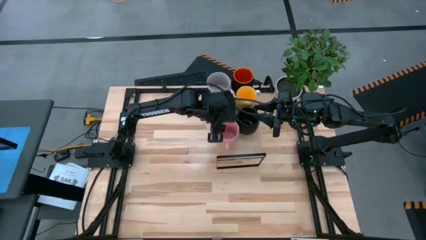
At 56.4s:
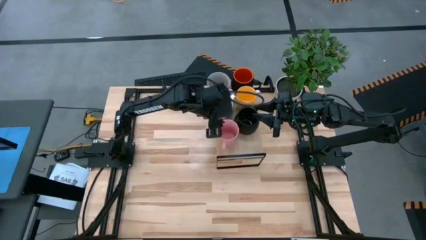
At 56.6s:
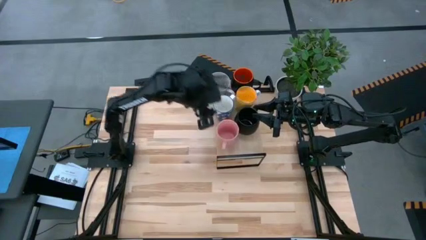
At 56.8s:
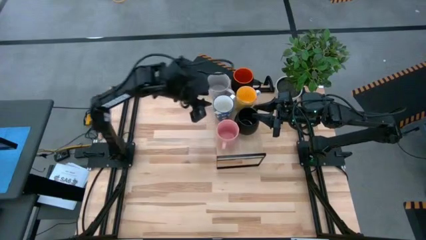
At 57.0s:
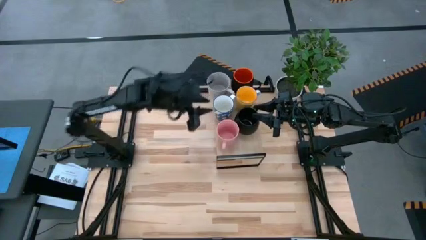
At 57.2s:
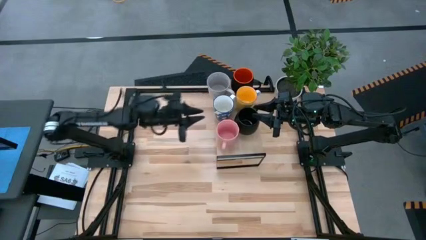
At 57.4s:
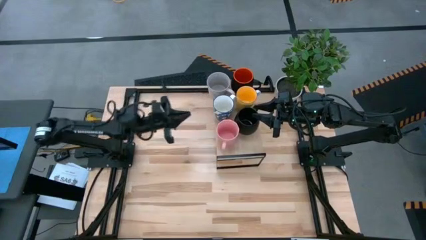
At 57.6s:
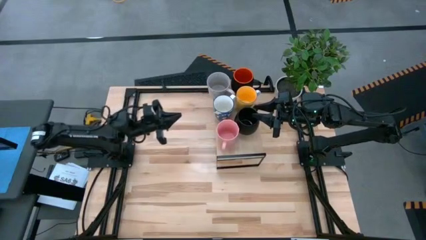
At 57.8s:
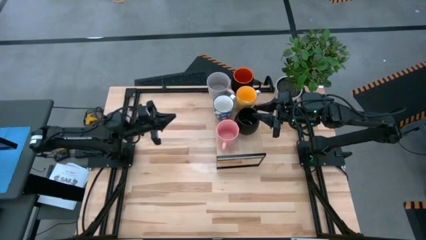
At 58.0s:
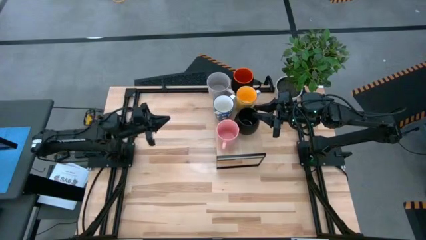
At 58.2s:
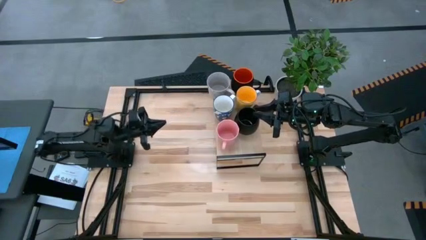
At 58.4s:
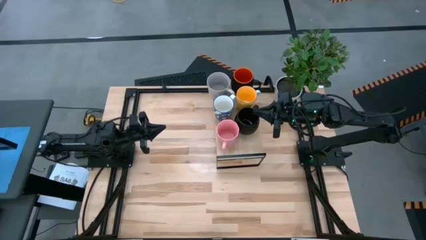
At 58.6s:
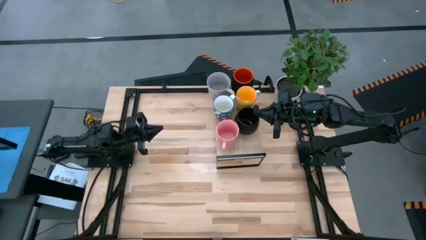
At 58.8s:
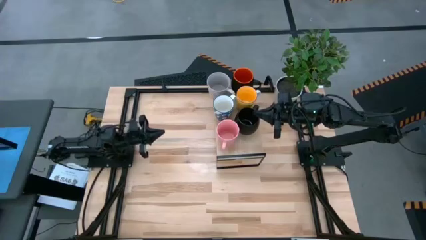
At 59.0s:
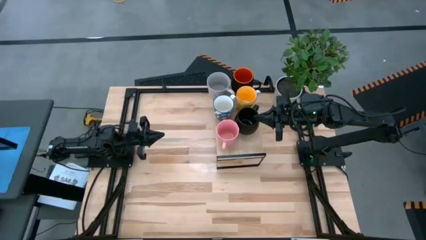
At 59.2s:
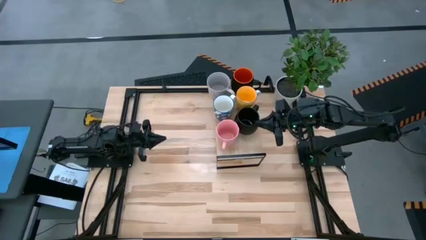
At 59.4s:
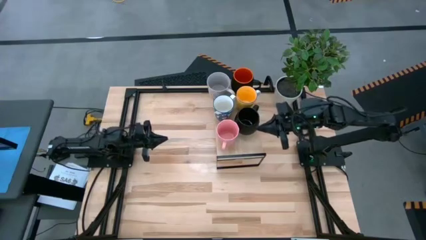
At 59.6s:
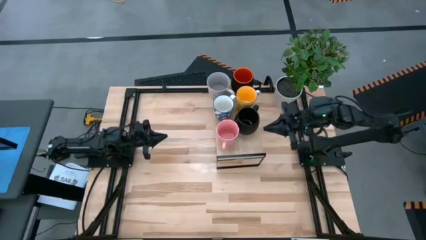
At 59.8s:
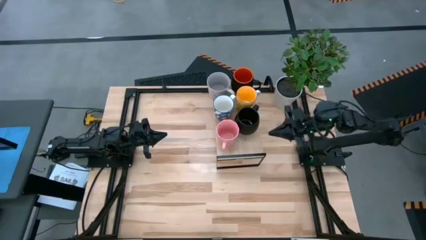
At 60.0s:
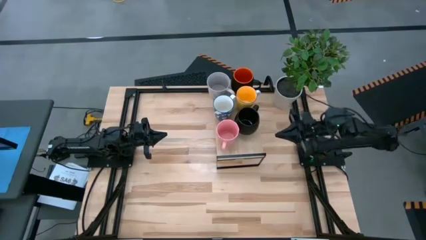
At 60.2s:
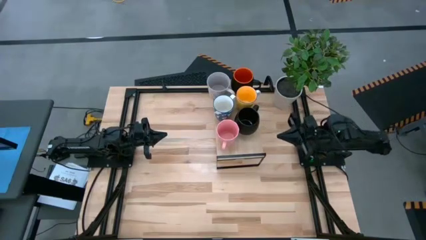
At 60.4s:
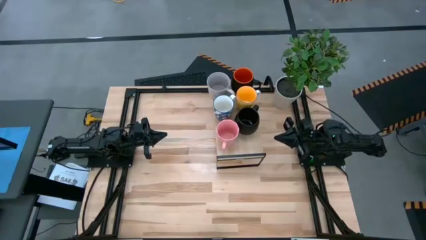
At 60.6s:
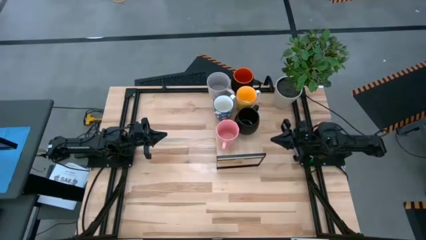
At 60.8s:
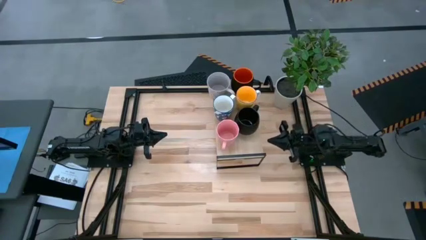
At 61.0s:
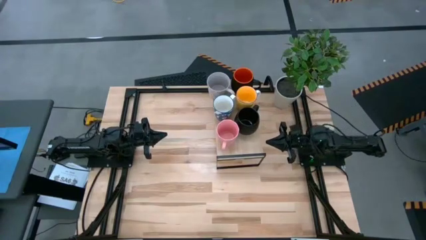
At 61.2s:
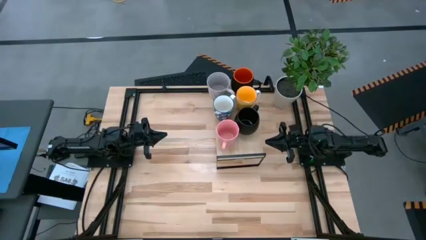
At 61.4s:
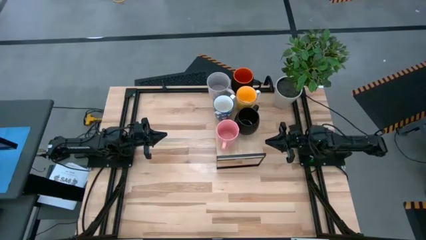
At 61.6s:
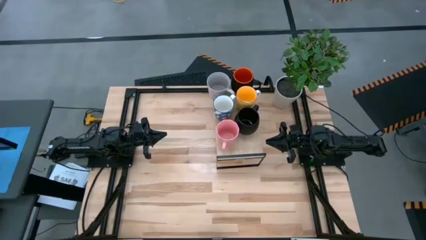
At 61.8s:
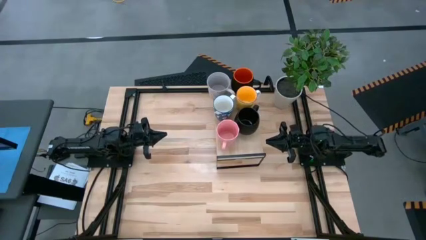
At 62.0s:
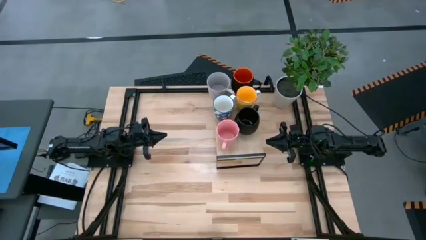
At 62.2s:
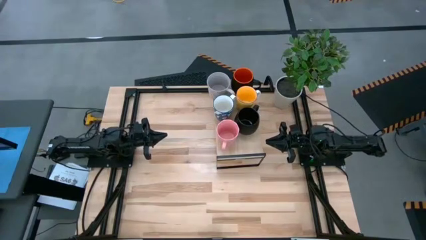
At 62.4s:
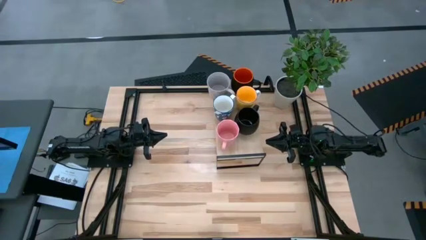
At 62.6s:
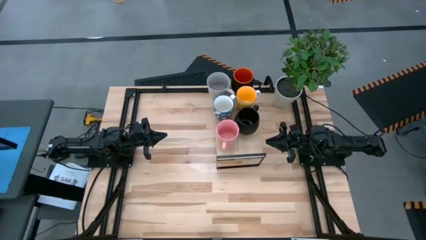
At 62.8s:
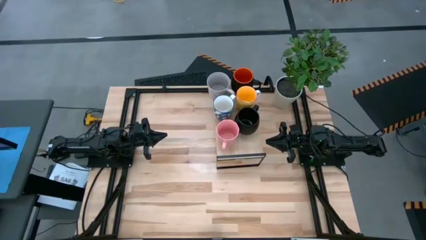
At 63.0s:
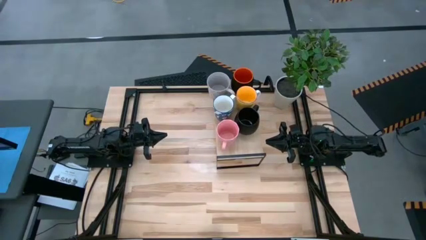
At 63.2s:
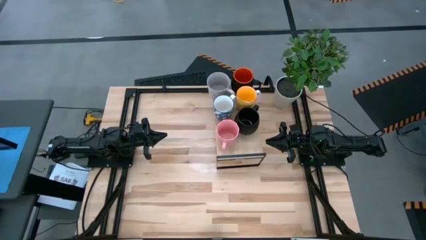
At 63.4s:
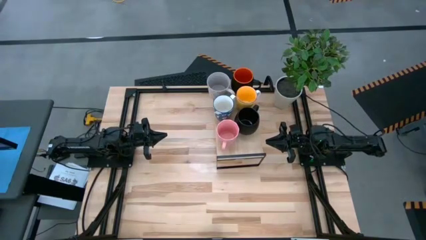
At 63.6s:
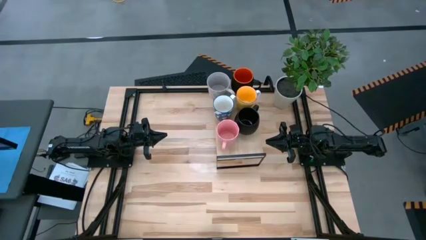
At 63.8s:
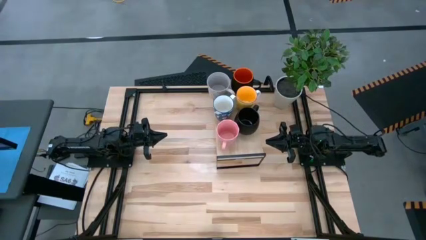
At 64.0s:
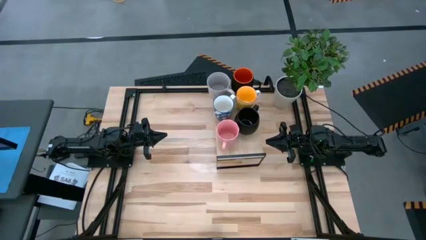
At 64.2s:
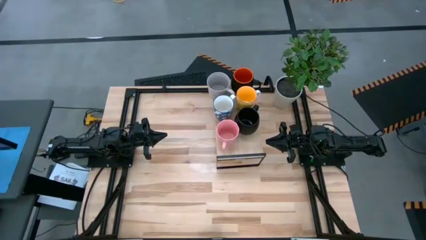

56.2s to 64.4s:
Task: Place coffee mugs
Return to Home Position

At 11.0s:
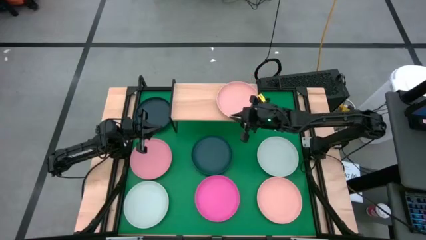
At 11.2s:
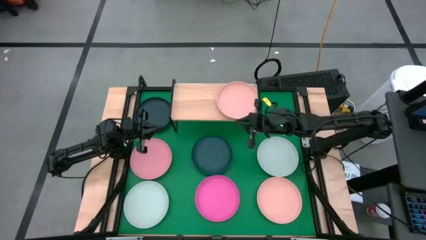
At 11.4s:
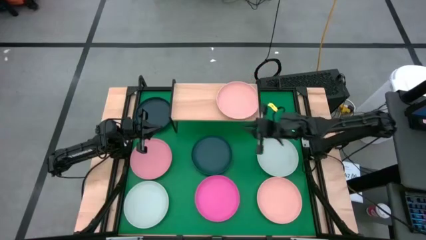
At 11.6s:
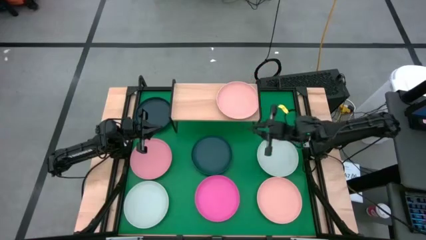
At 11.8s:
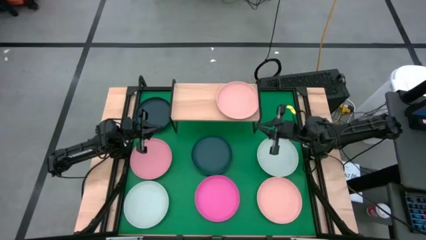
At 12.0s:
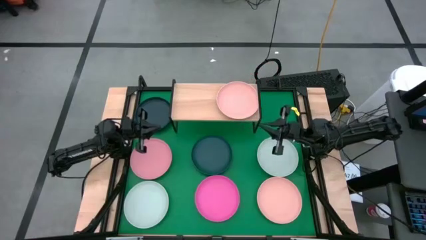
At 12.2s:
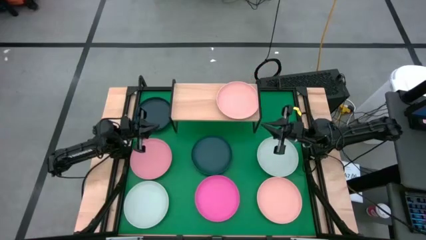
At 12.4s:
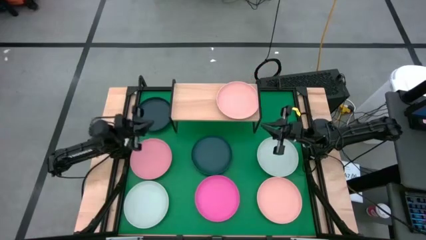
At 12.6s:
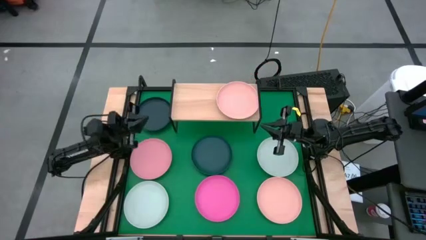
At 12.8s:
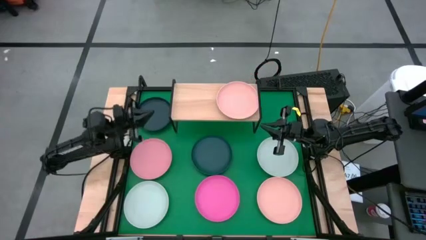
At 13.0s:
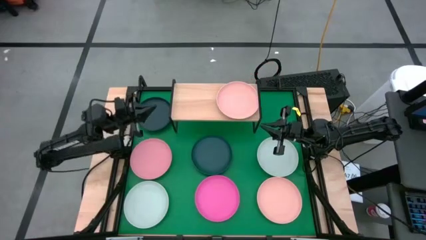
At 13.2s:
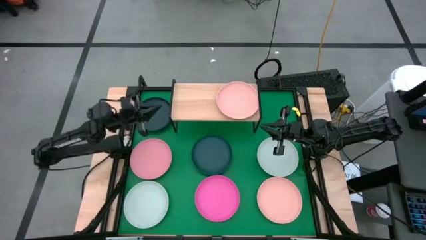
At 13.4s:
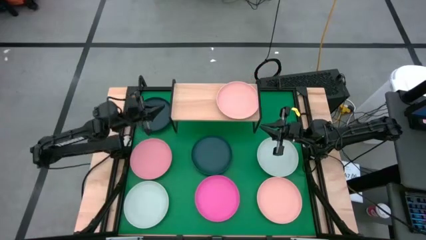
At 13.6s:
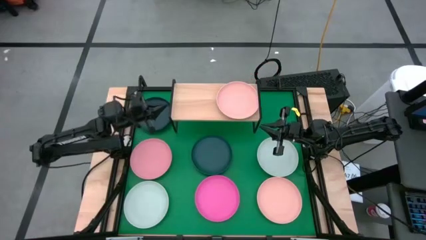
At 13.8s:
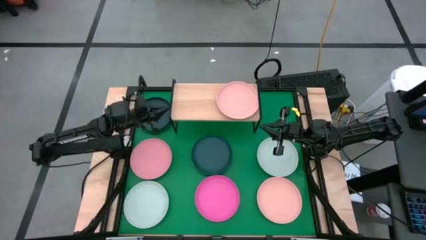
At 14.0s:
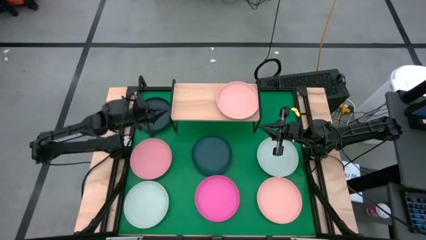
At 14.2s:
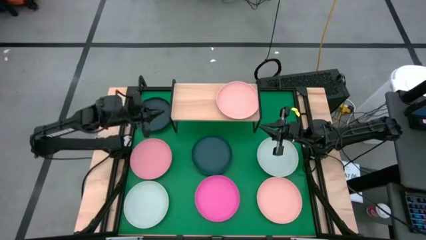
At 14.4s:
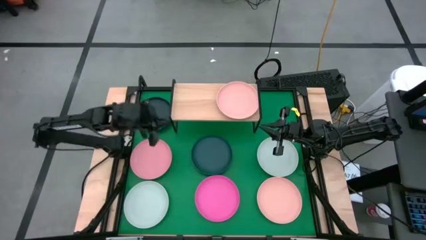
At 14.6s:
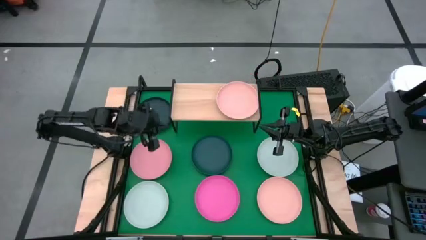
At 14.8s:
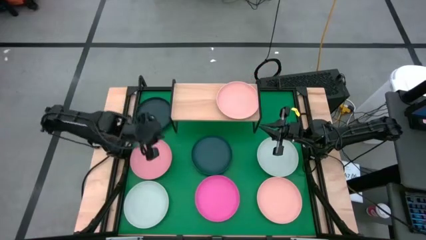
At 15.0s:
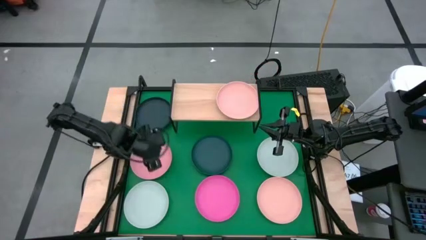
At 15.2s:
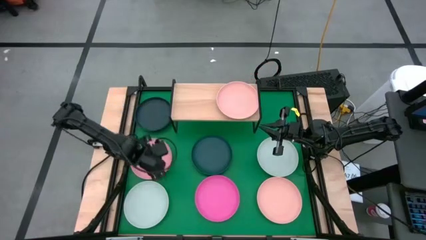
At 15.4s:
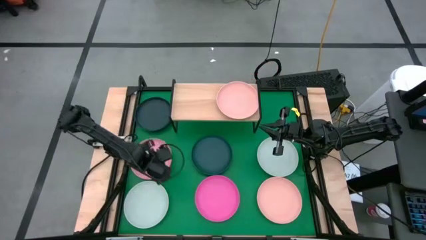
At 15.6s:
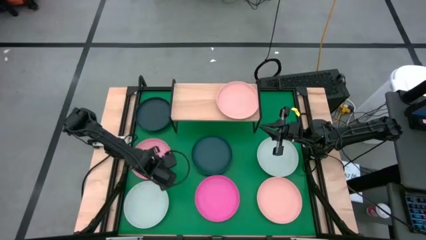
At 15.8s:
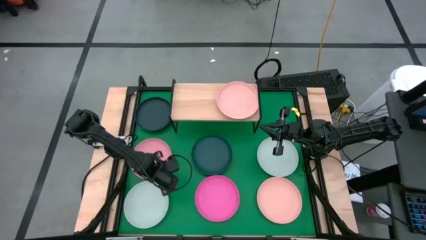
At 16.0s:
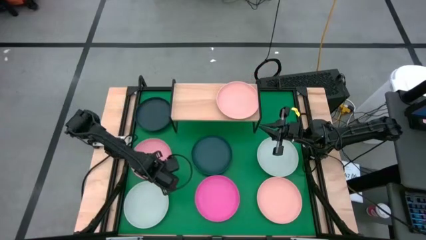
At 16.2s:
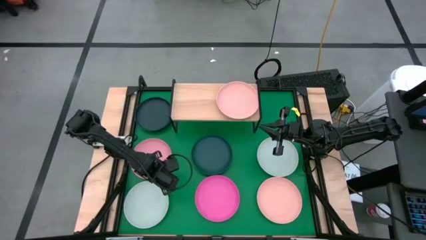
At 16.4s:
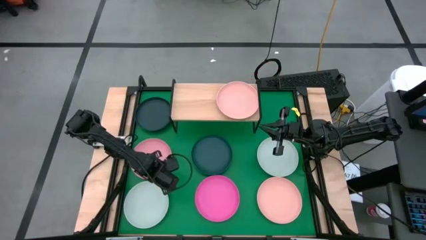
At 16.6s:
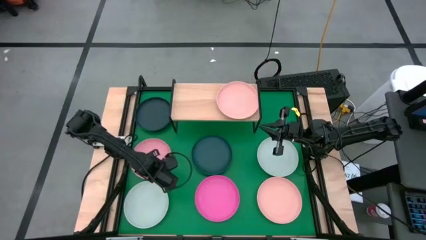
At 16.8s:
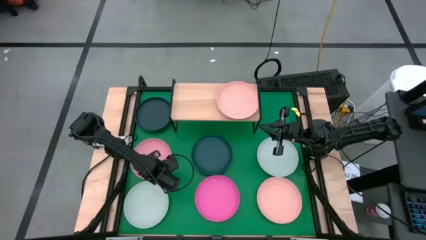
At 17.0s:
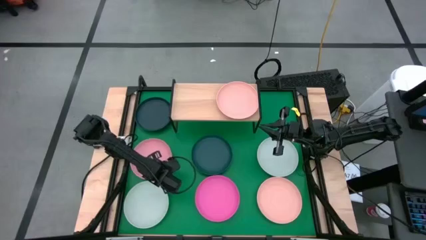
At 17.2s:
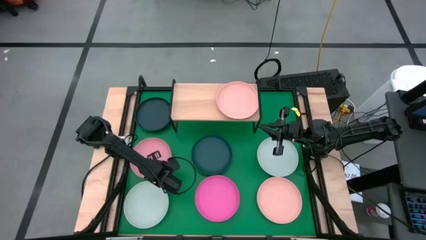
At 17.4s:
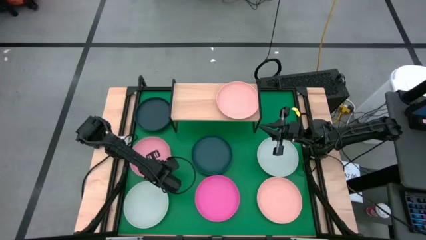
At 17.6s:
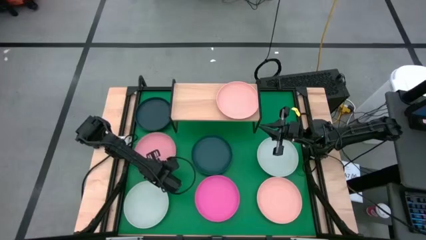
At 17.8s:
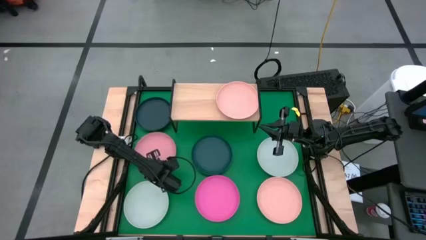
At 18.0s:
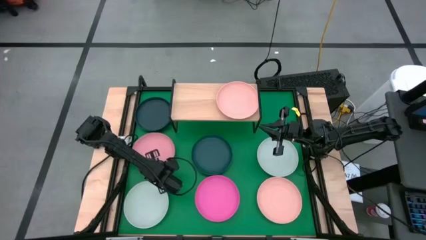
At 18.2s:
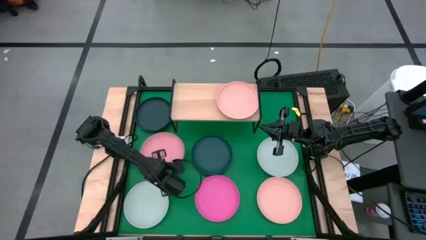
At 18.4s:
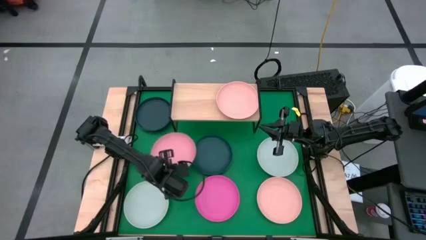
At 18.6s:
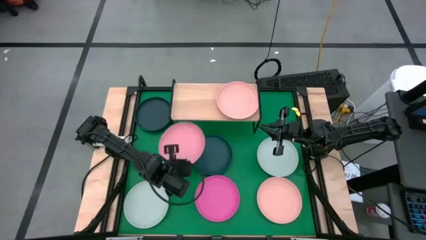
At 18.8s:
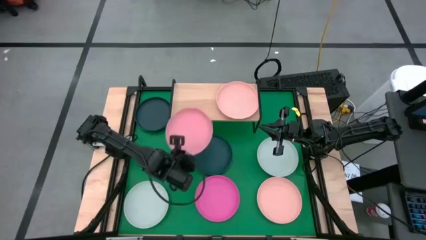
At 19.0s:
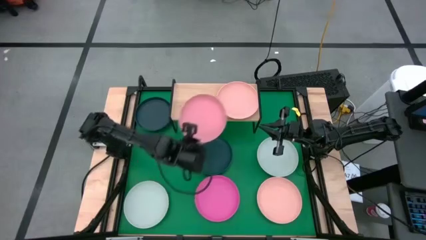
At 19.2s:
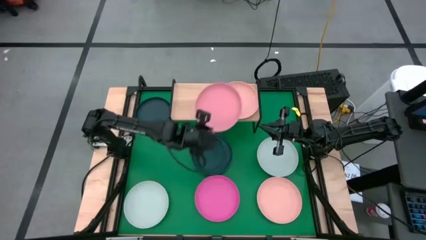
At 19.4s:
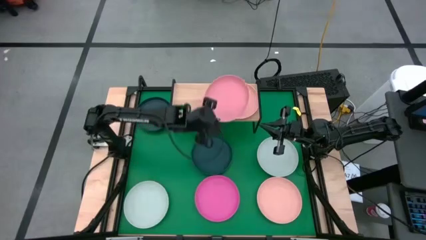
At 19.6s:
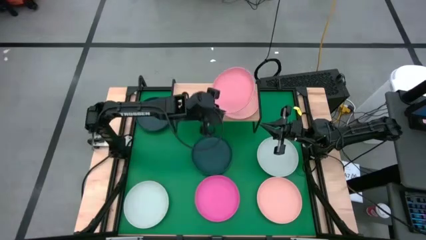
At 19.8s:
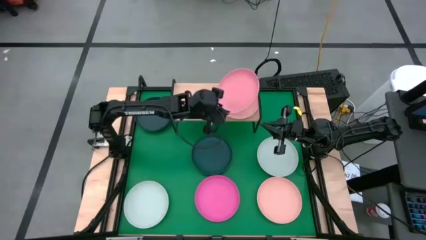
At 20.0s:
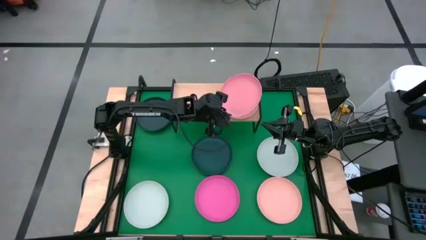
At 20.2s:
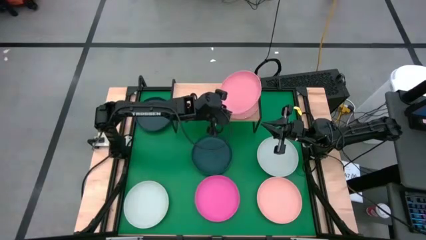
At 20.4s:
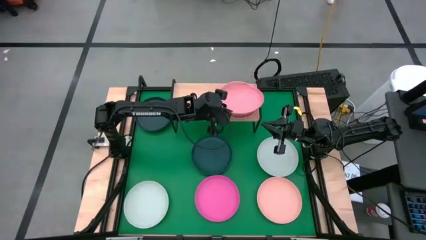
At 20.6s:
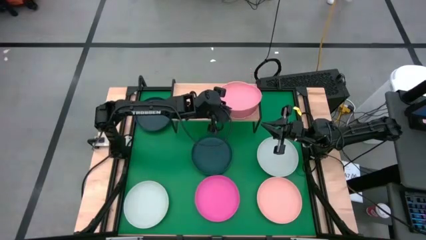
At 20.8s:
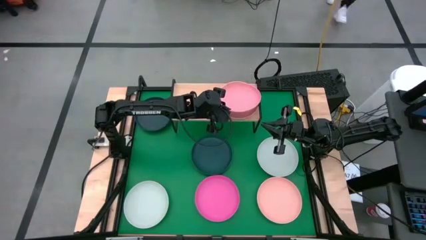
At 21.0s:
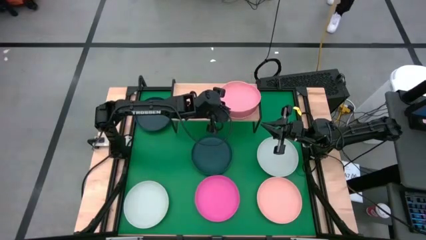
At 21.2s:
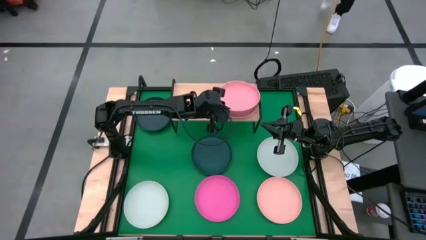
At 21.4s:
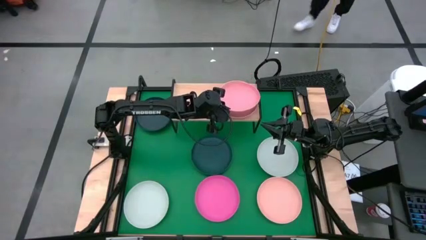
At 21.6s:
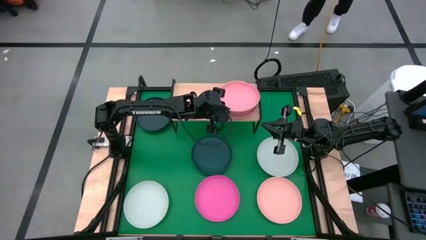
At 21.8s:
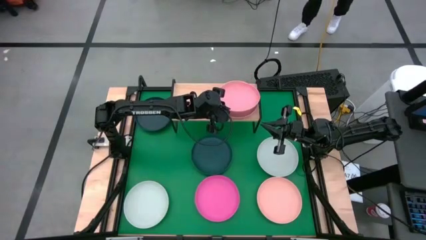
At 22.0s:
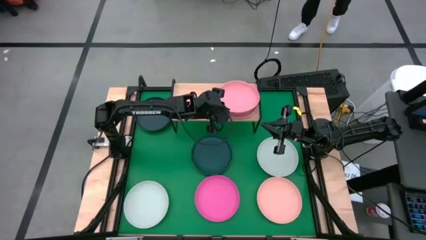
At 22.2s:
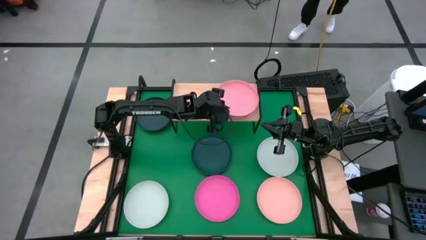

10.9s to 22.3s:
Task: Place and stack plates onto a shelf
Stack the light pink plate on top of the light orange plate on the shelf
